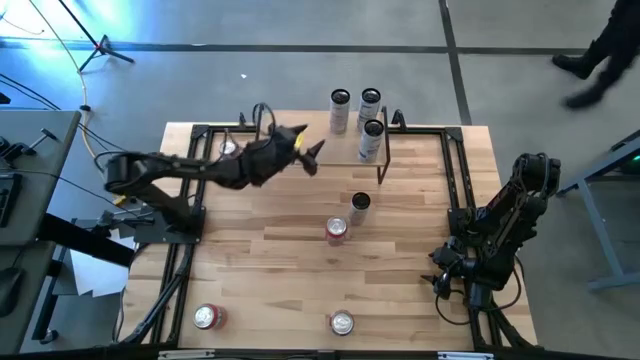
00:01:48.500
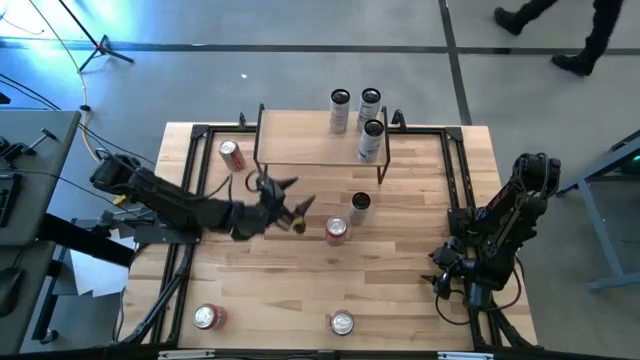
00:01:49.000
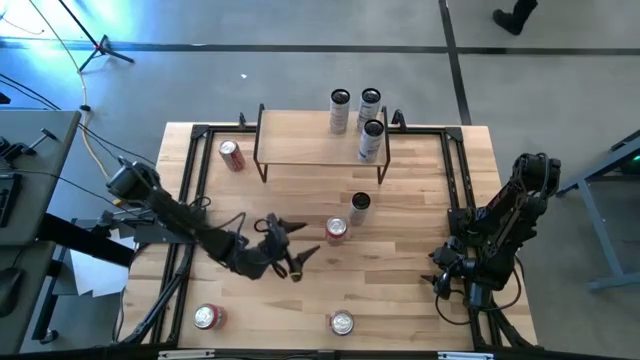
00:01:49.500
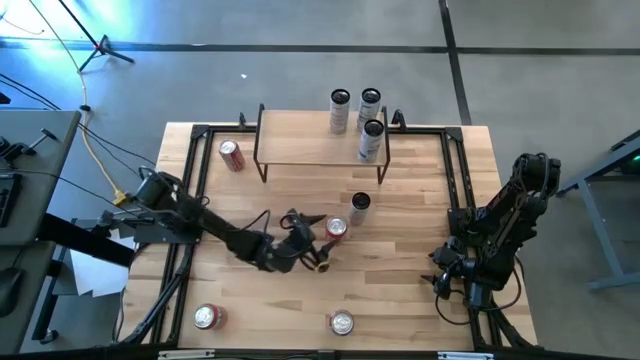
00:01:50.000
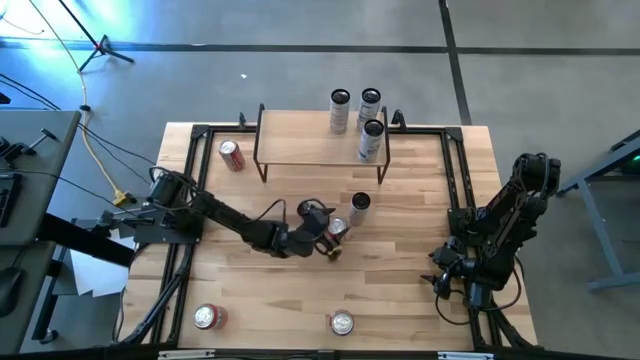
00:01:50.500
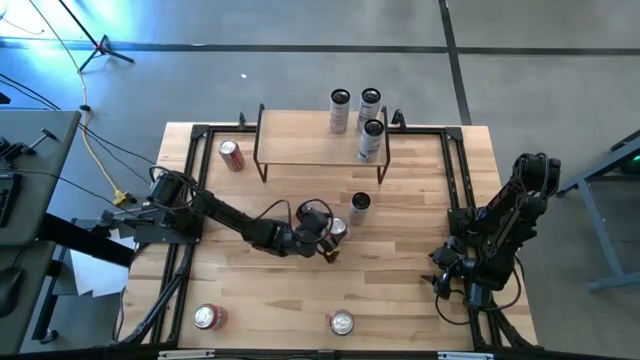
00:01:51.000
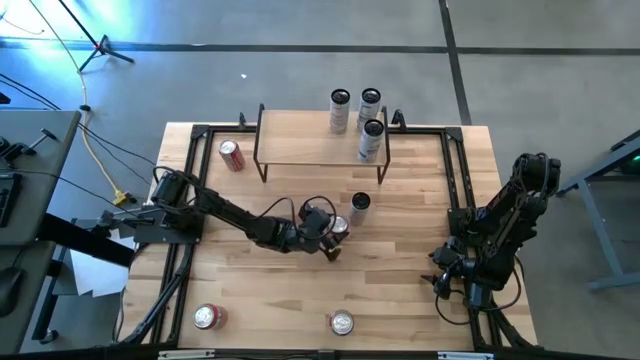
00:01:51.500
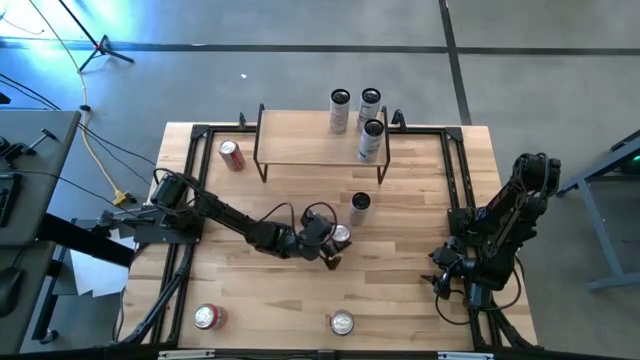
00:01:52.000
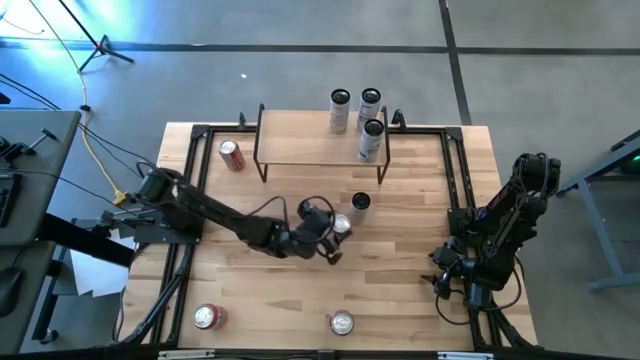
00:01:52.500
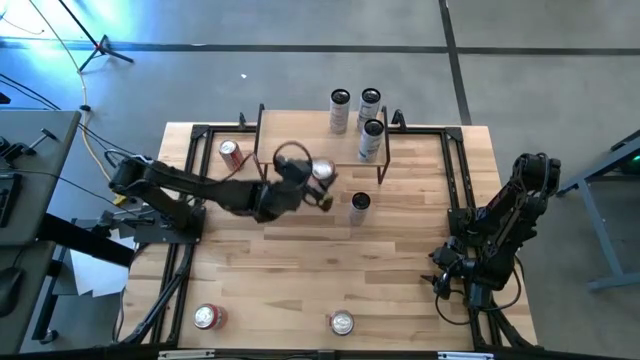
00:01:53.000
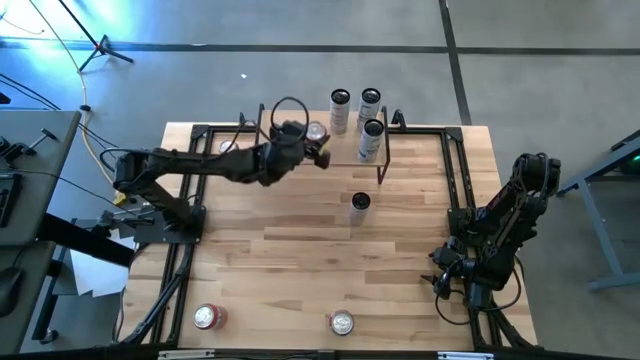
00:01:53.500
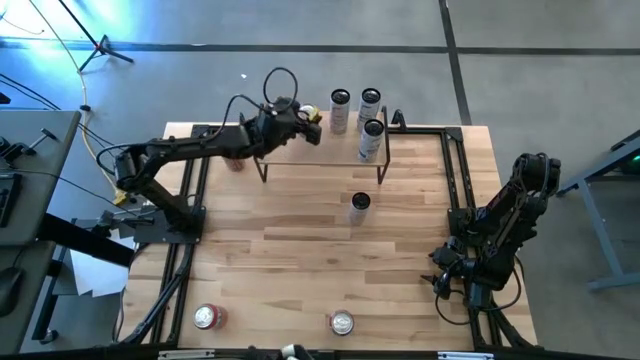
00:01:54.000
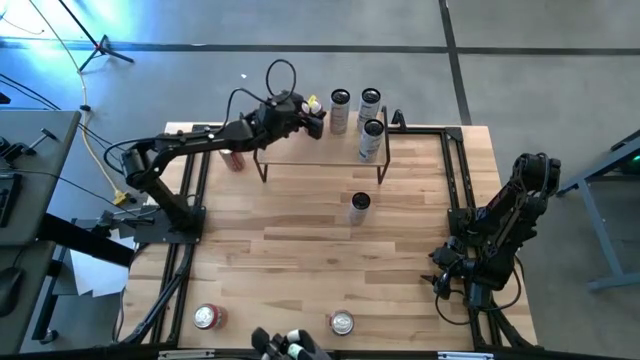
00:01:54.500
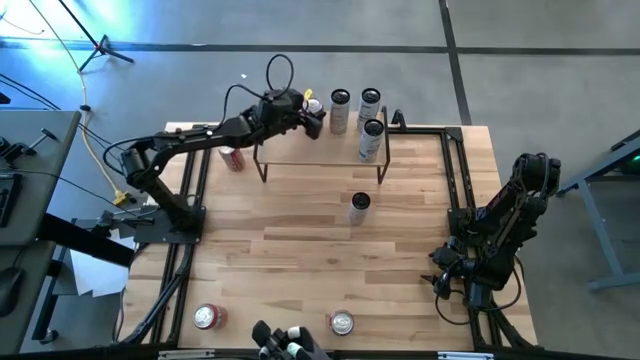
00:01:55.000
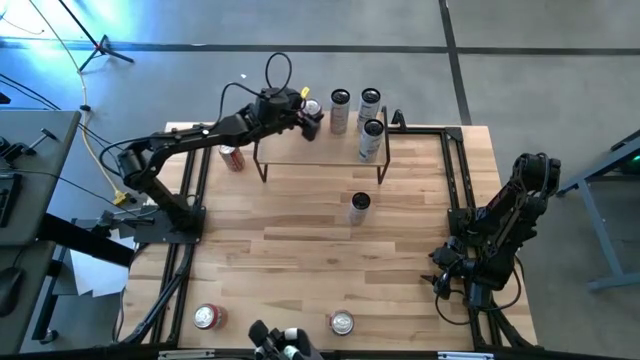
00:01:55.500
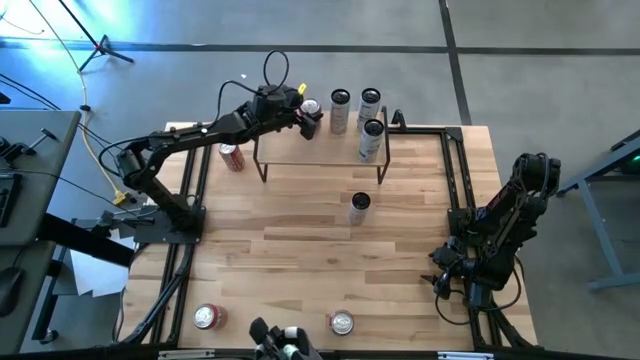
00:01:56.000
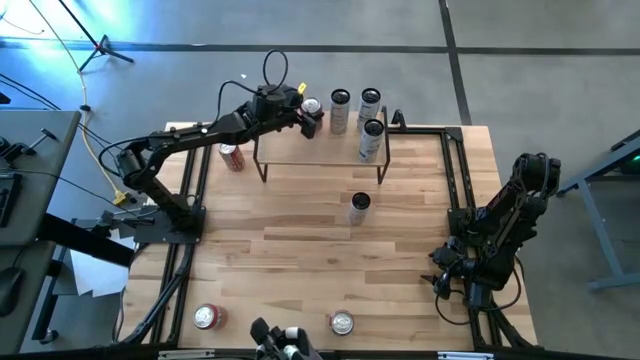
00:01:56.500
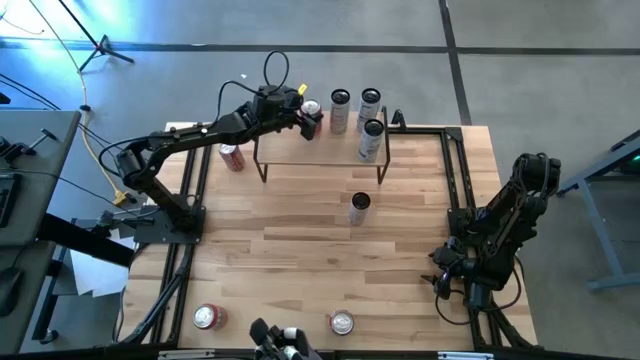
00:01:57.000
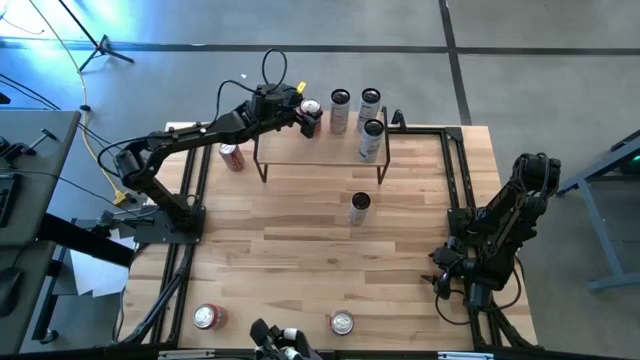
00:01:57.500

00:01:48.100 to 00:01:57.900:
Task: Place canned beverage on shelf
Put the top red soda can on the shelf

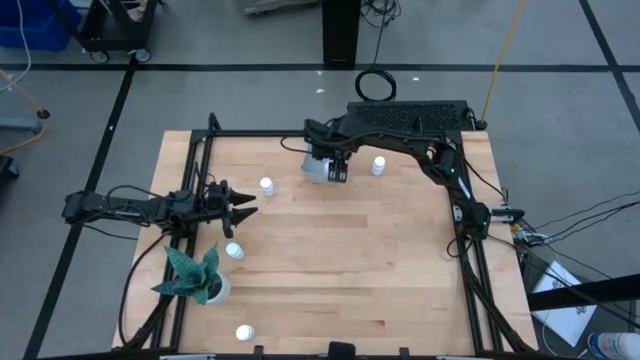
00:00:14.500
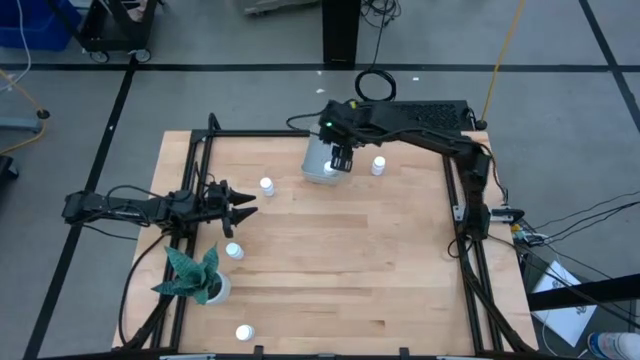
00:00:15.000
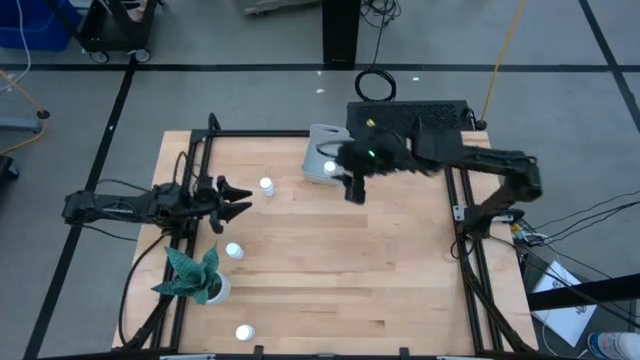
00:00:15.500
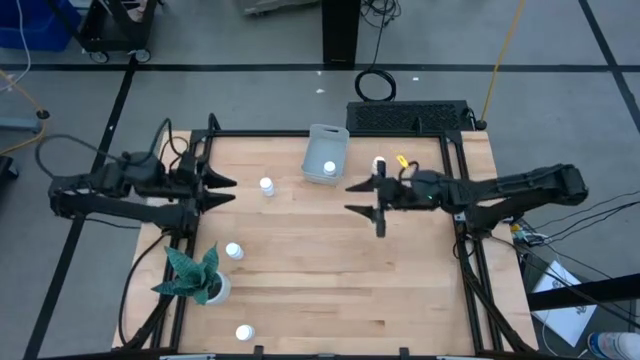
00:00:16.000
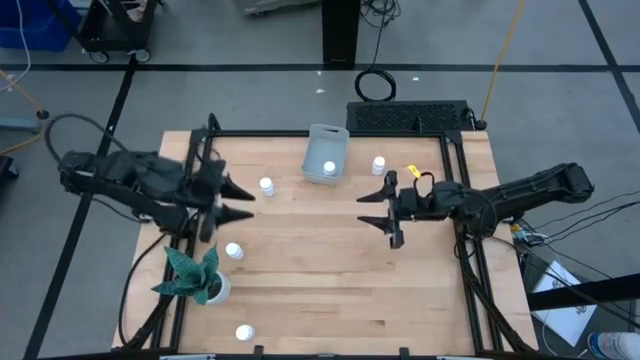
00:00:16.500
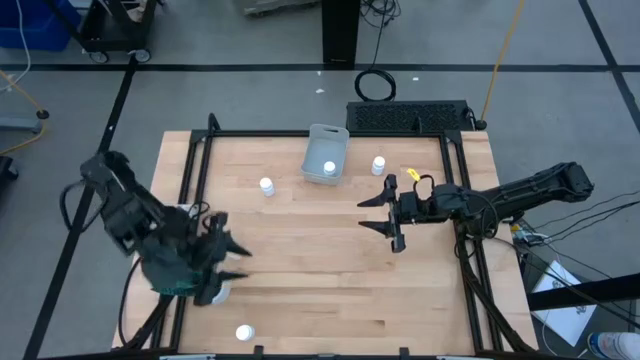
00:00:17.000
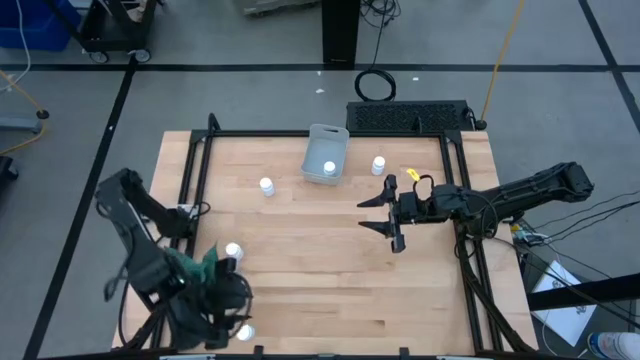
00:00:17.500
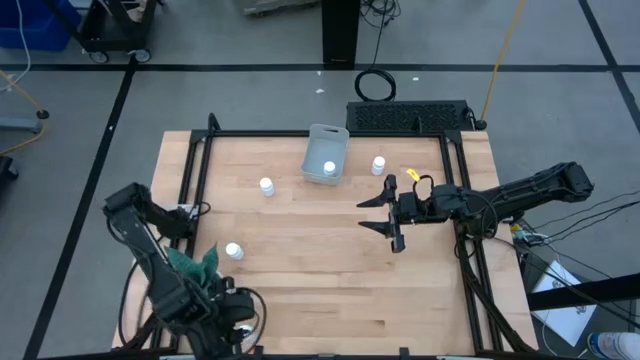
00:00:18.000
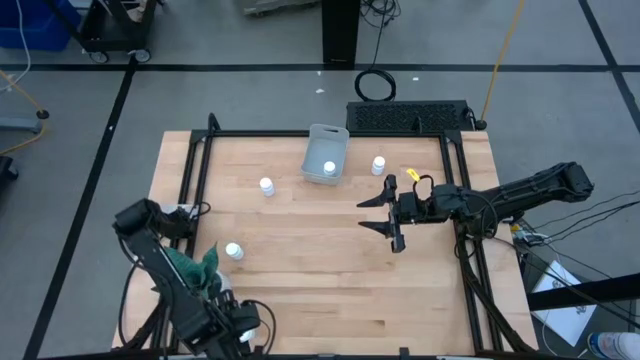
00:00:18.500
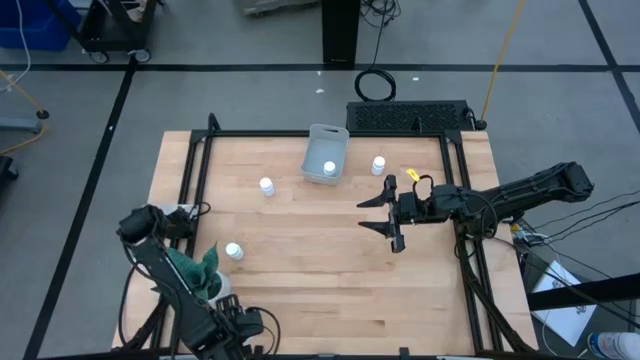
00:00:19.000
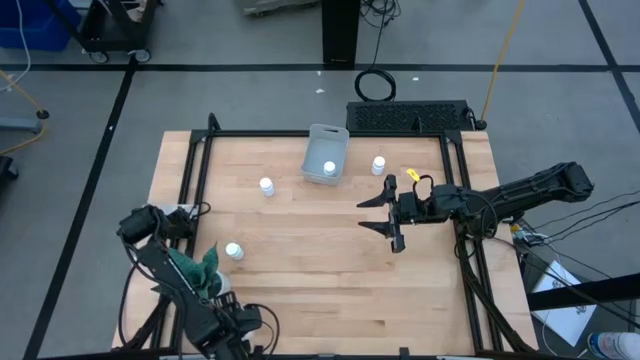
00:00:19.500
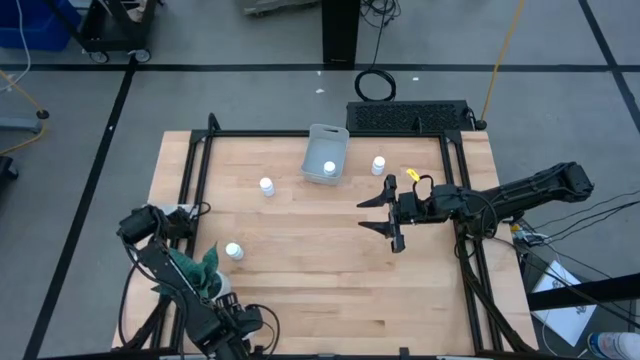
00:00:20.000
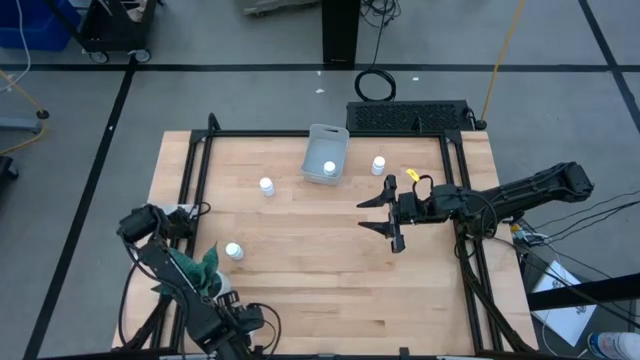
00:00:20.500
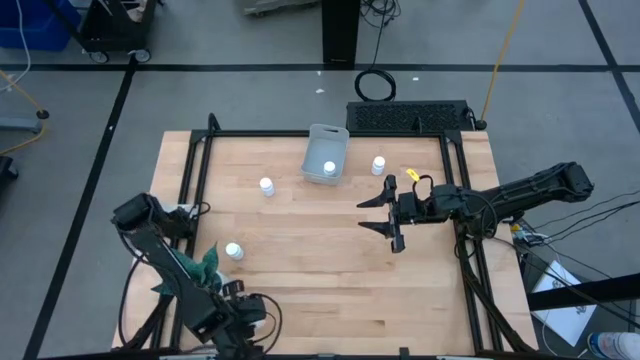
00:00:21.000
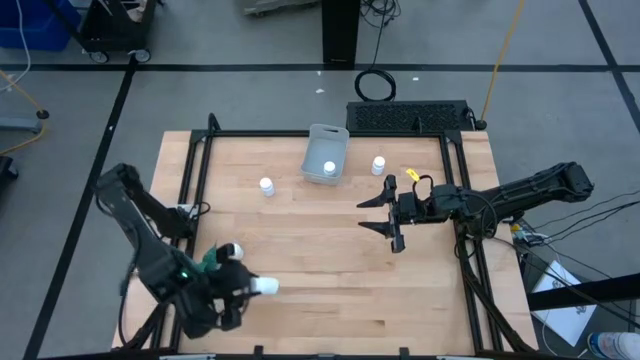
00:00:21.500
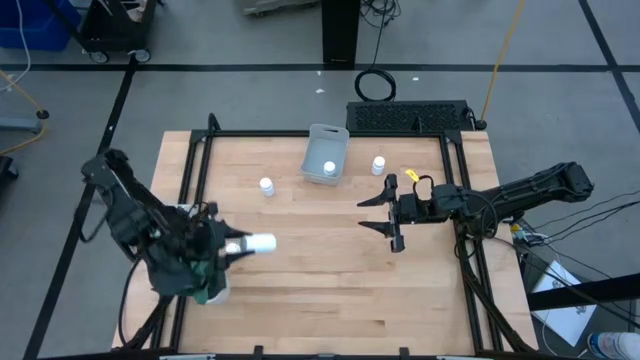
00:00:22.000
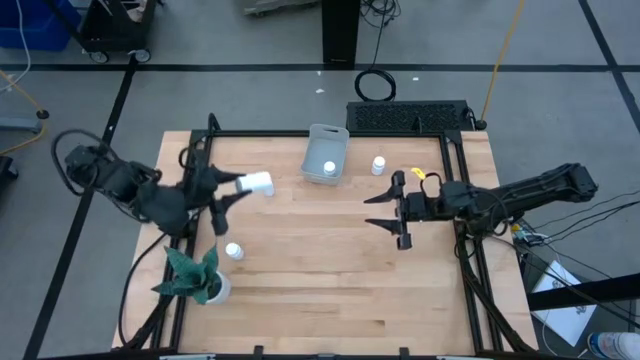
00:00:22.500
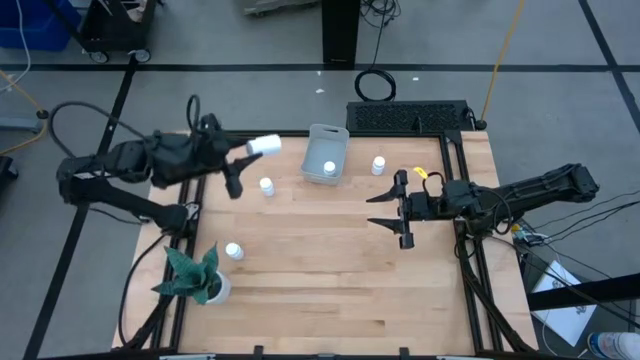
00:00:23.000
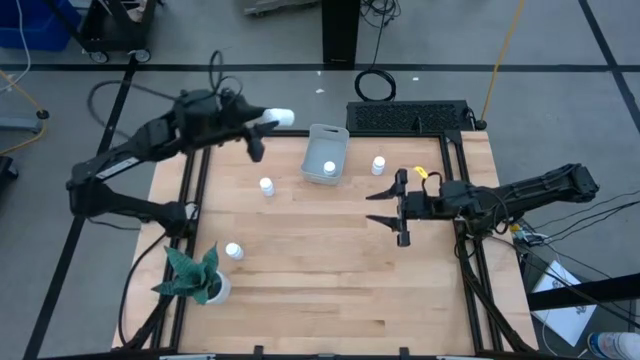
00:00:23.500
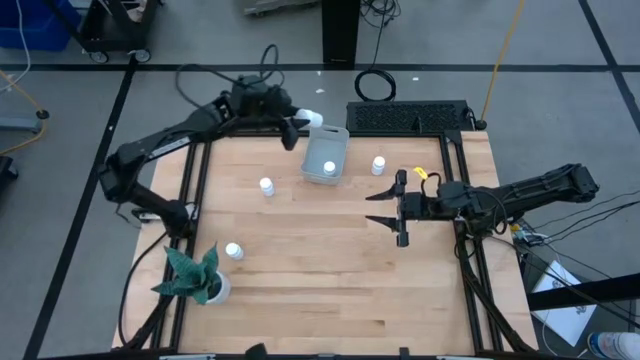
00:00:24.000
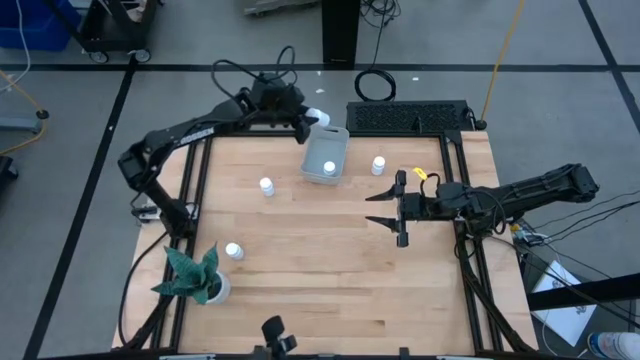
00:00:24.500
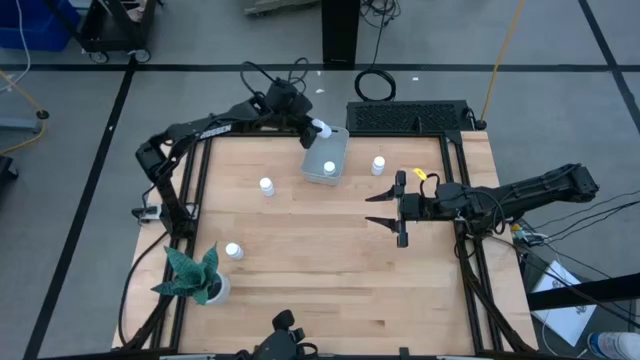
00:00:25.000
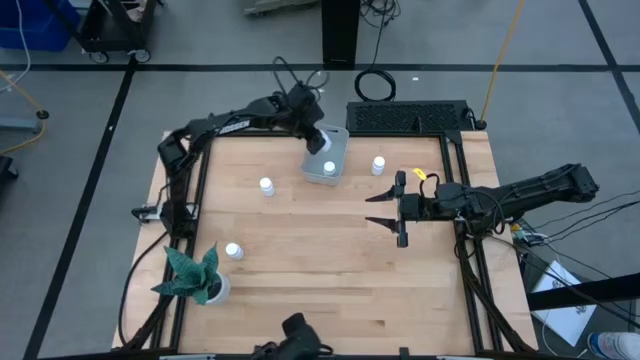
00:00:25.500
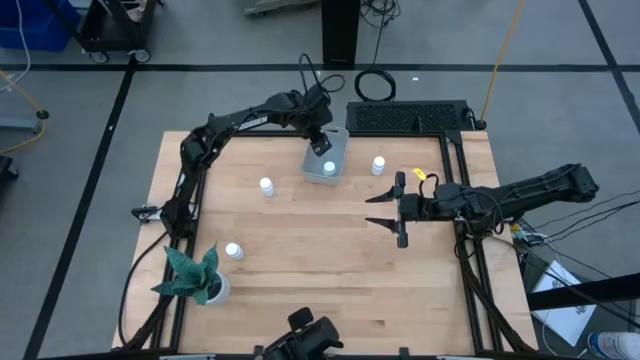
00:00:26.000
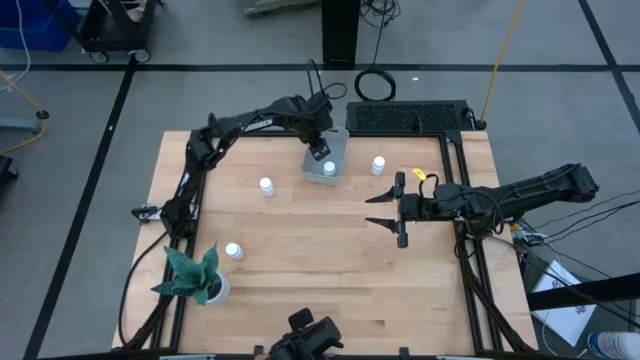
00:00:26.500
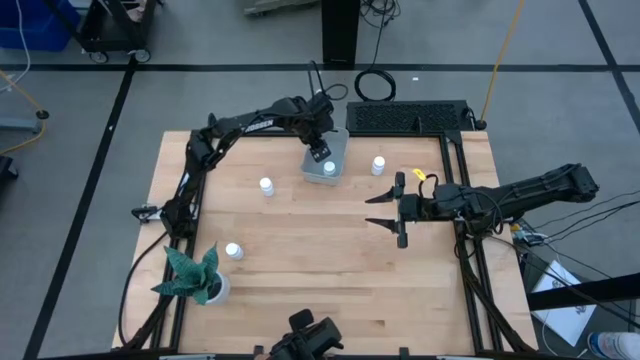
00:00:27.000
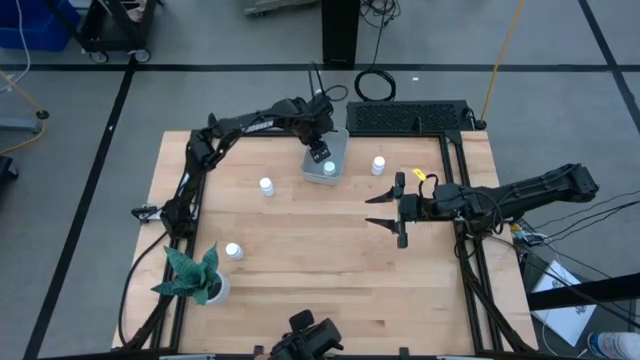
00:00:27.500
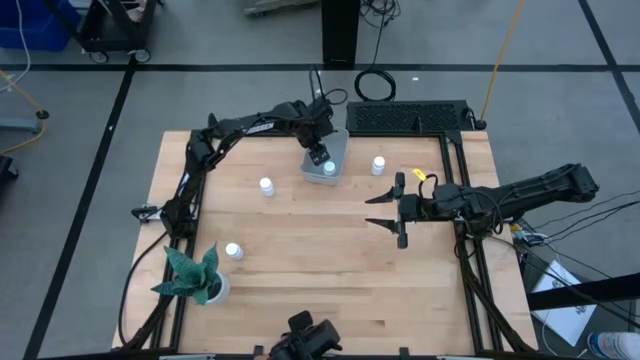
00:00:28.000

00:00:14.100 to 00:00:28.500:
Task: Pick and place pill bottles into a basket
Put the white medicine bottle into the gray bin
